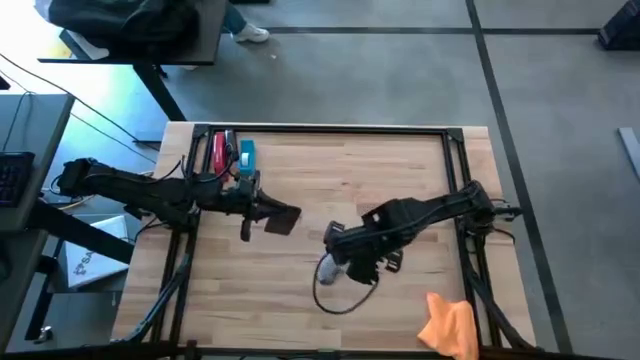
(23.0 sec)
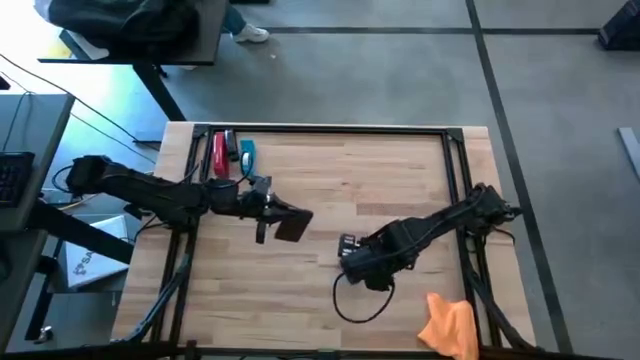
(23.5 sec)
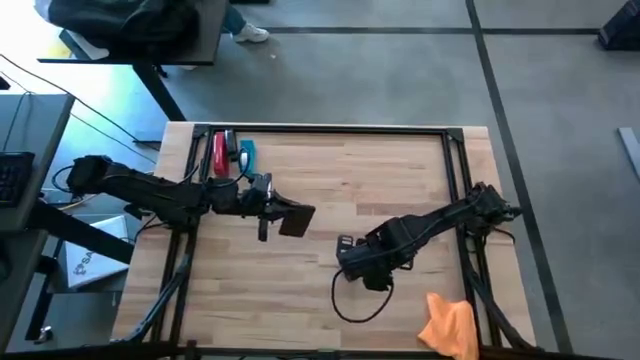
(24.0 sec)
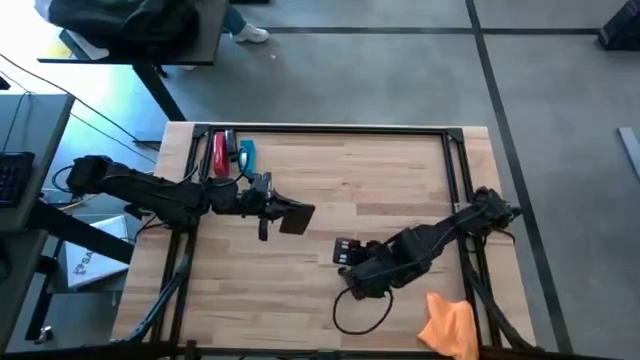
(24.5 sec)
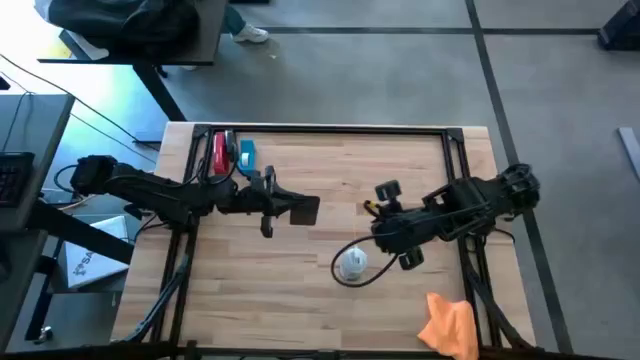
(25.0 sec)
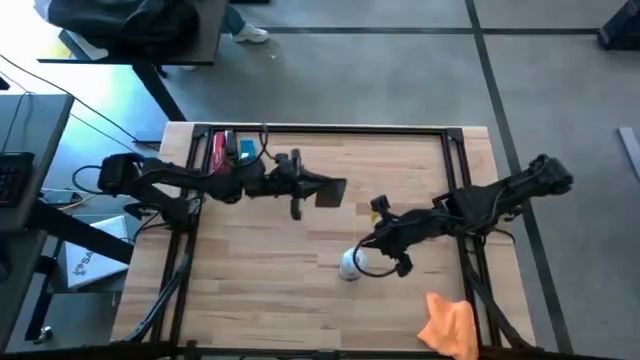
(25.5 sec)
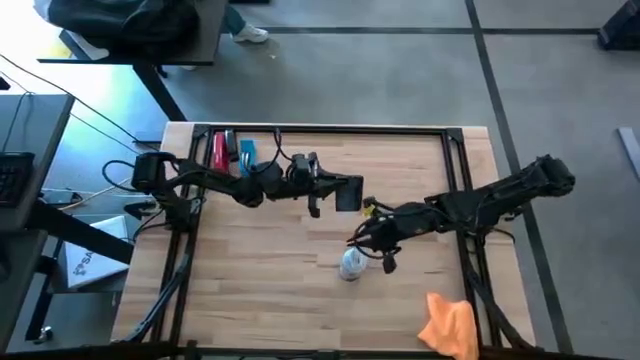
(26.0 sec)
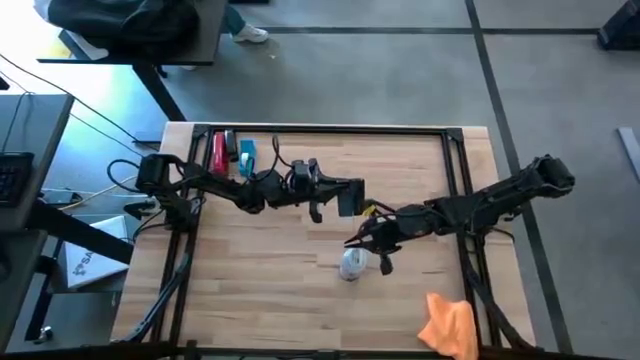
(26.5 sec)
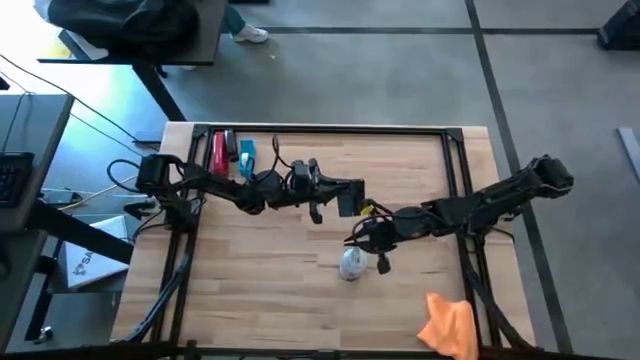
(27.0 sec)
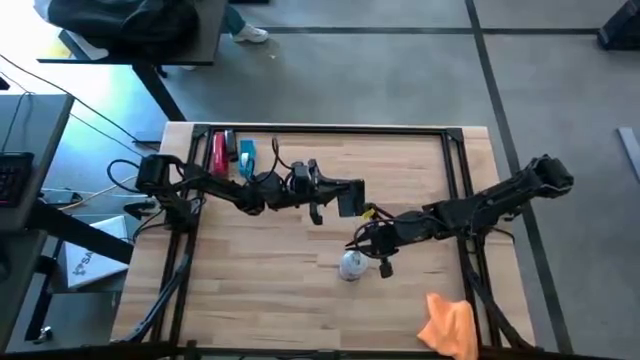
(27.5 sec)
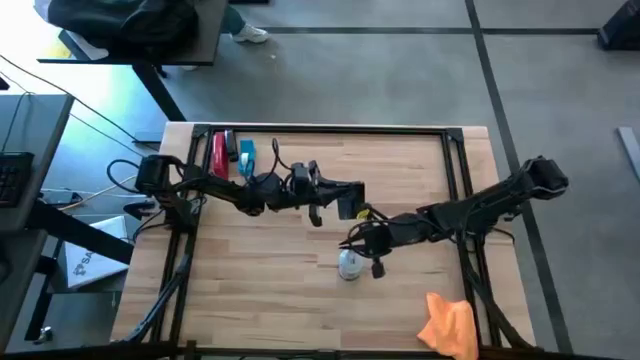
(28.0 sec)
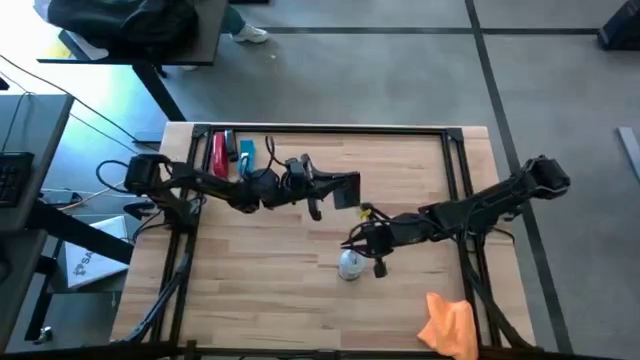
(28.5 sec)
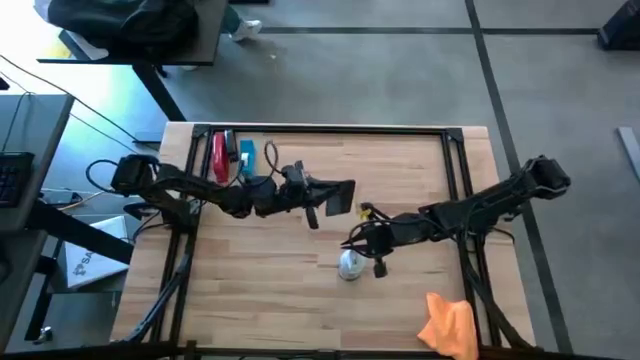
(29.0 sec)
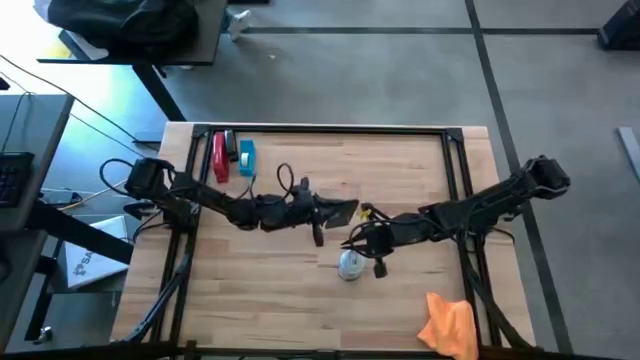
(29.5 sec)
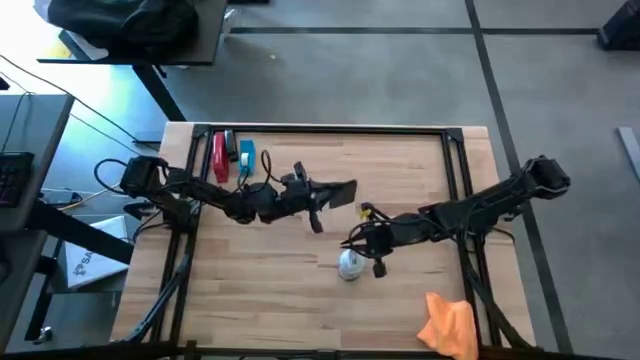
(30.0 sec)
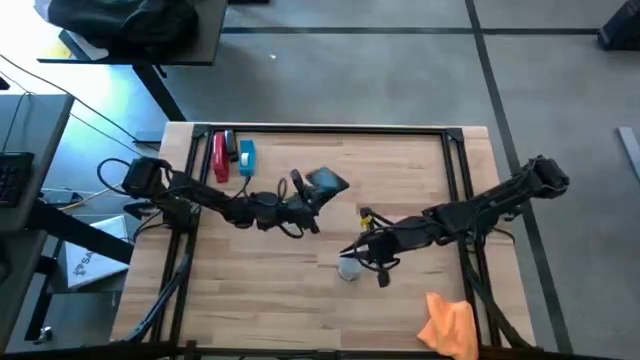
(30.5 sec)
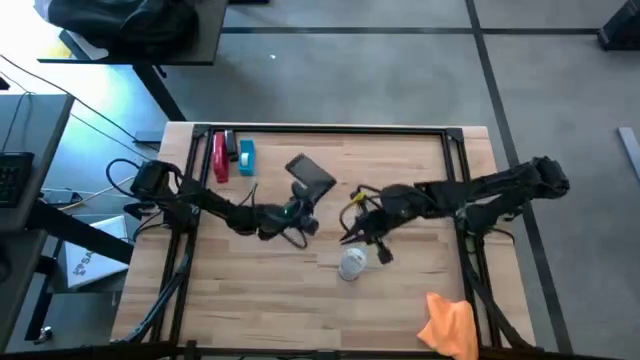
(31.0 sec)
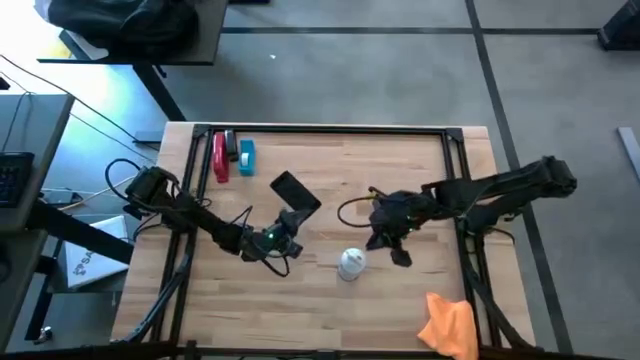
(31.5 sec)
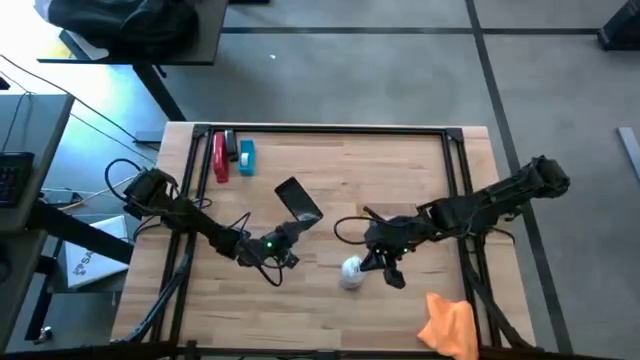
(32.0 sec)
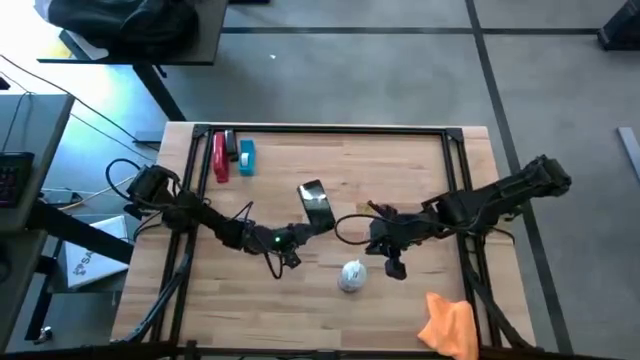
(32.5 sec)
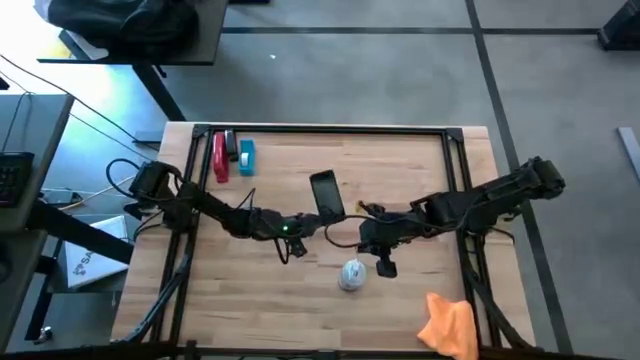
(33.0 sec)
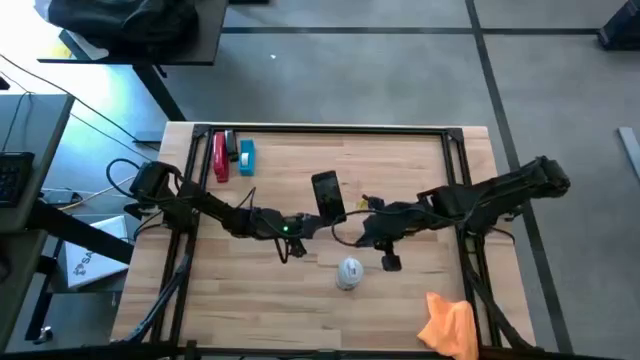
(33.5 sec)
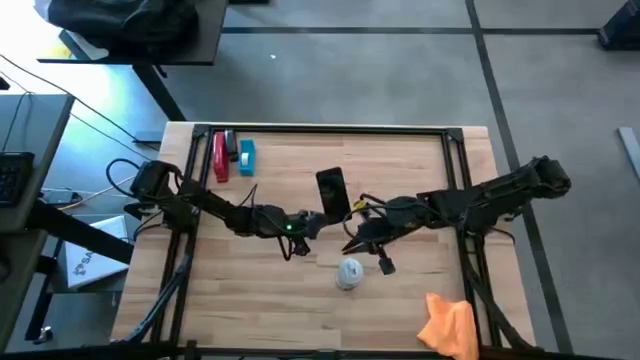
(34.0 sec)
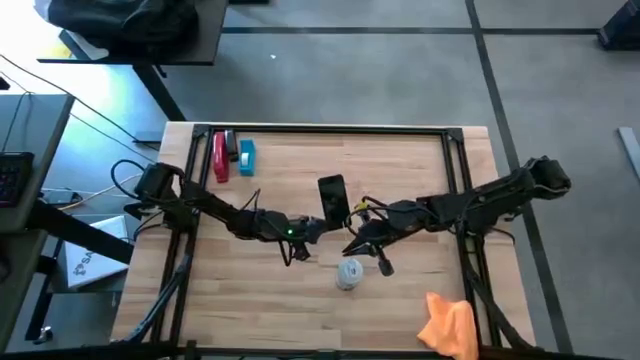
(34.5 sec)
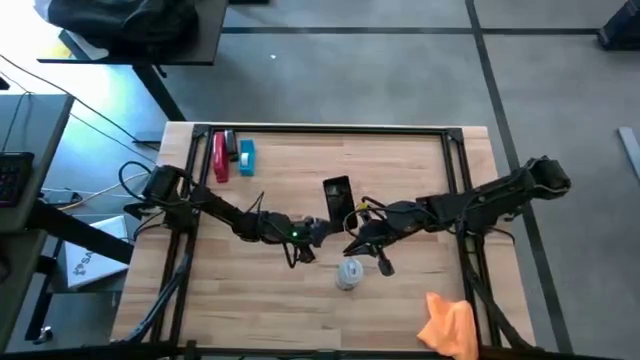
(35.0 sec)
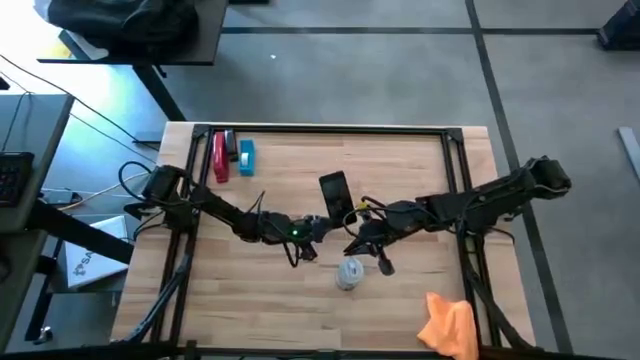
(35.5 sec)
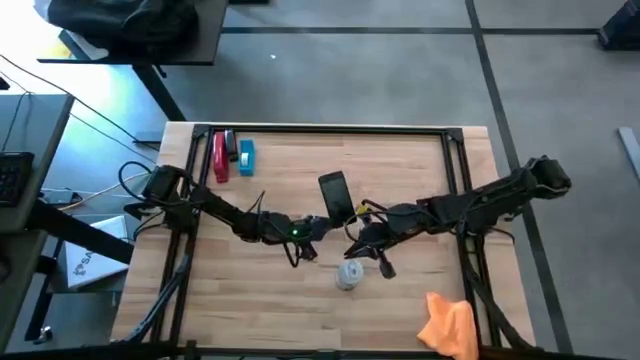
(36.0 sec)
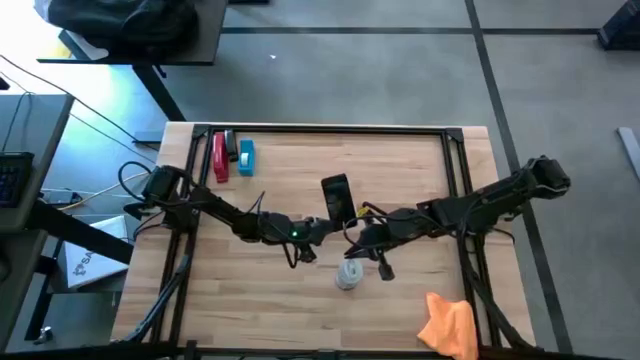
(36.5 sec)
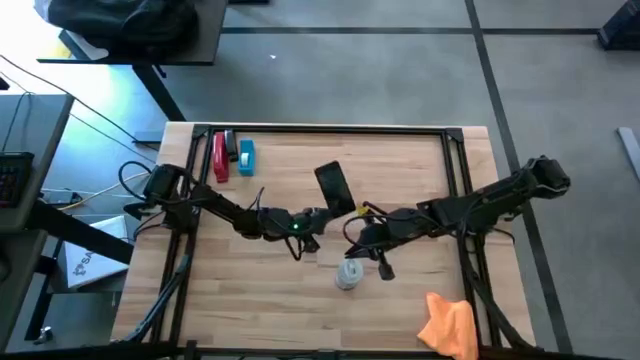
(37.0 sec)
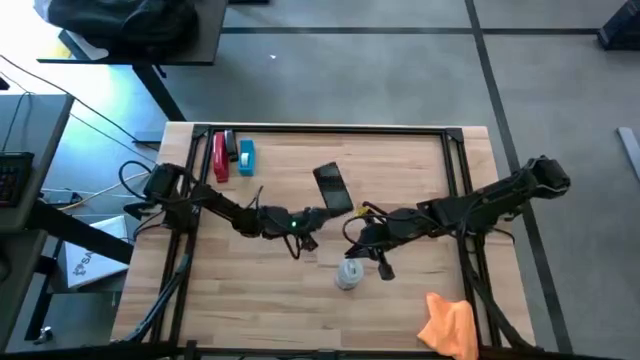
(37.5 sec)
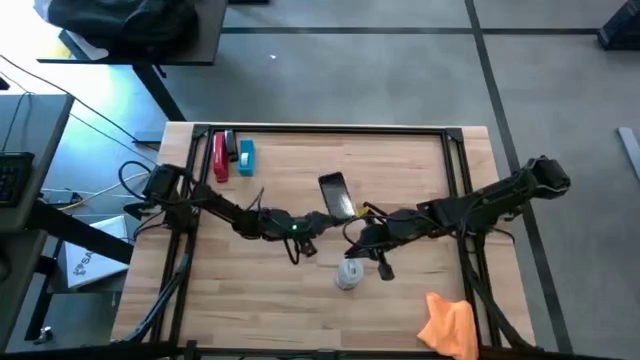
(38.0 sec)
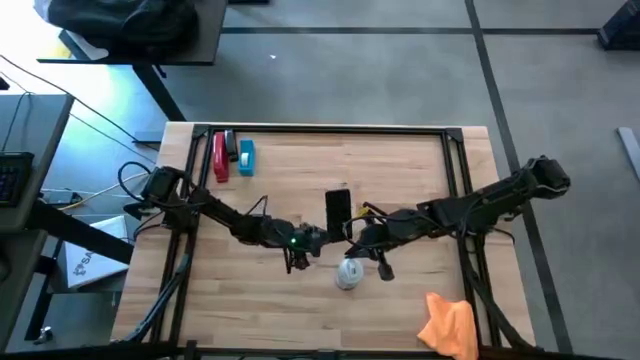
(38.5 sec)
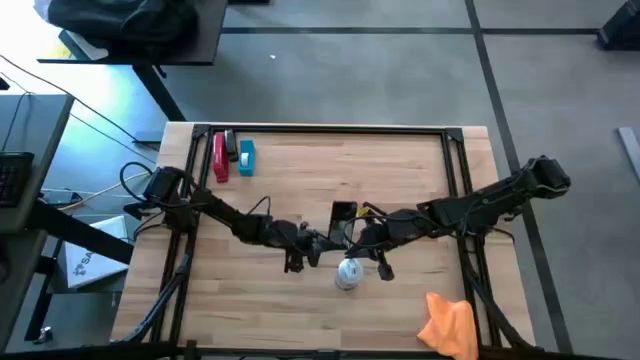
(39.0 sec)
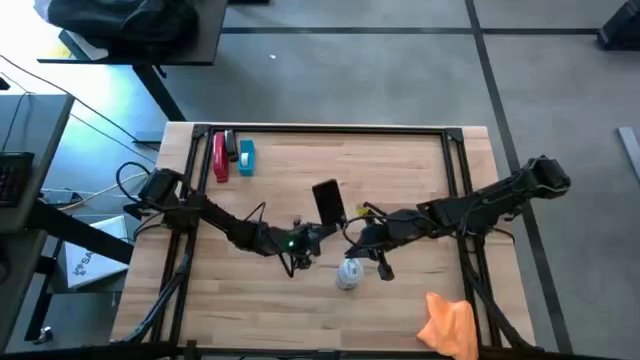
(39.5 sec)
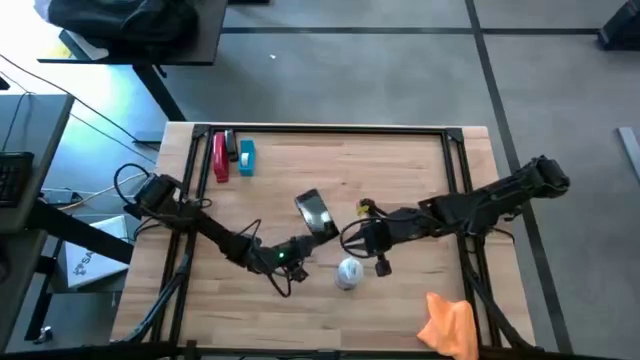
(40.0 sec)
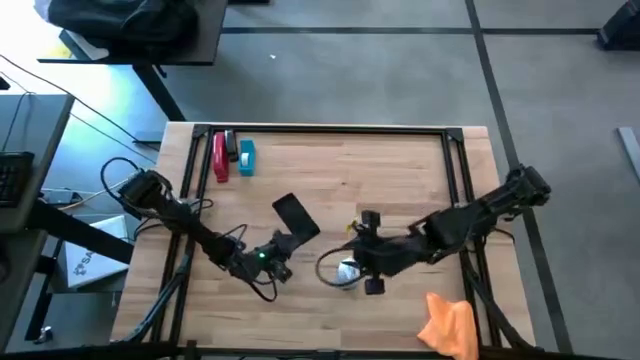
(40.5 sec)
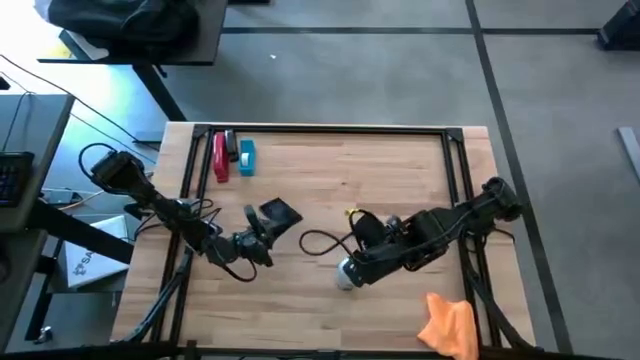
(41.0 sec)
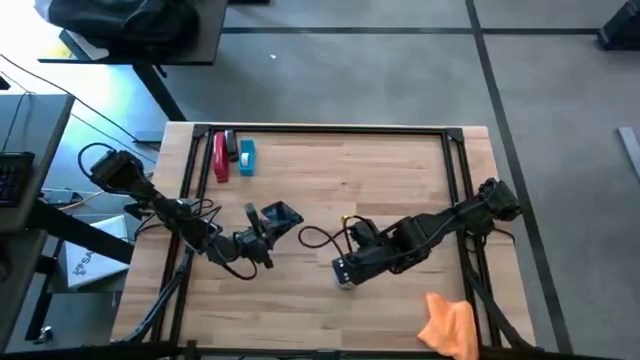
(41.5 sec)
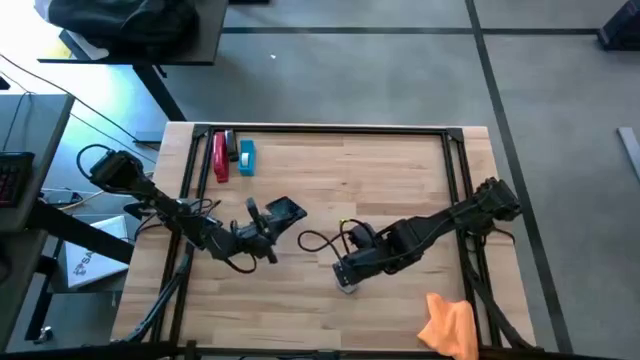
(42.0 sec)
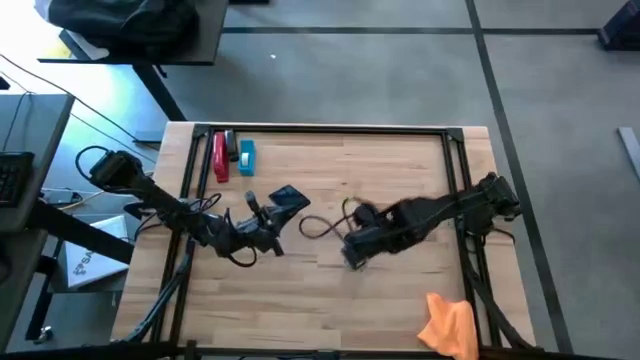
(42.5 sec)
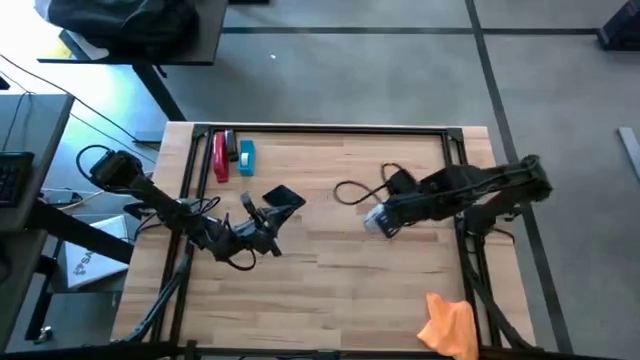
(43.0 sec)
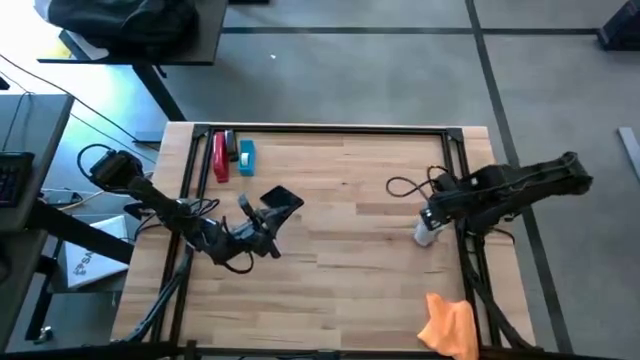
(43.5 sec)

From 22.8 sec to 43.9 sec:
Task: Apply microfiber cloth
Spray the front and back of the black cellphone using the white spray bottle
